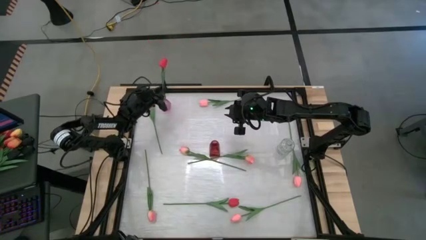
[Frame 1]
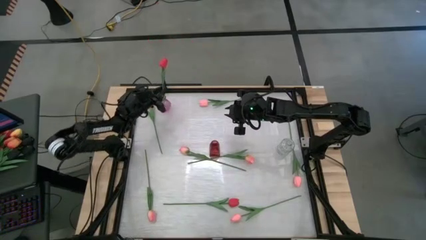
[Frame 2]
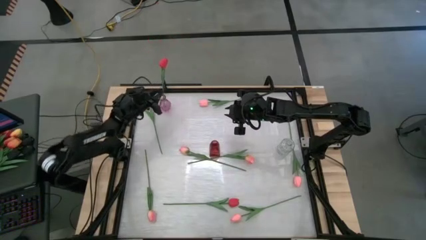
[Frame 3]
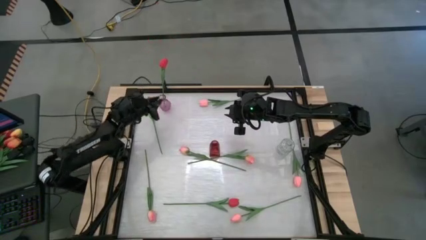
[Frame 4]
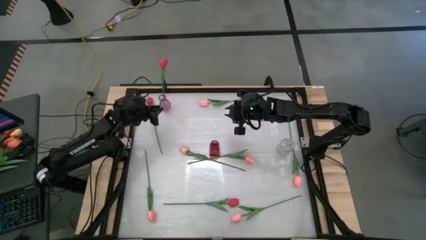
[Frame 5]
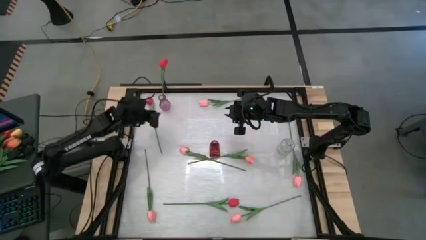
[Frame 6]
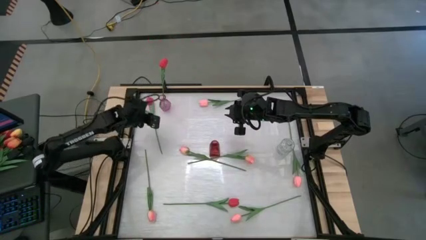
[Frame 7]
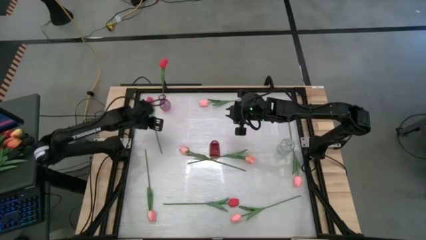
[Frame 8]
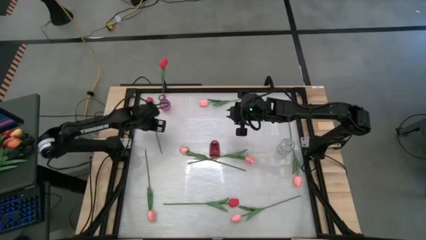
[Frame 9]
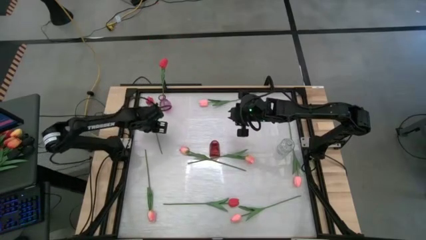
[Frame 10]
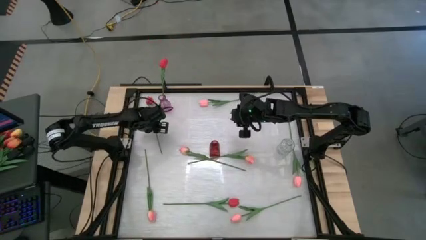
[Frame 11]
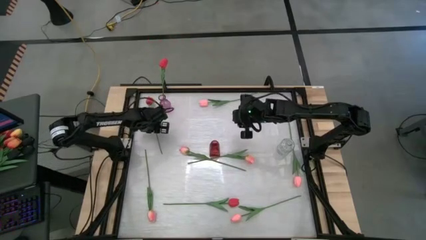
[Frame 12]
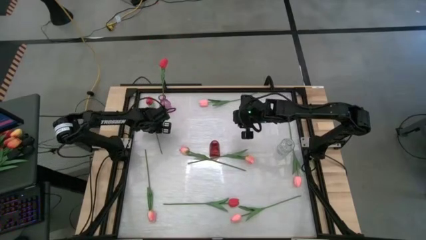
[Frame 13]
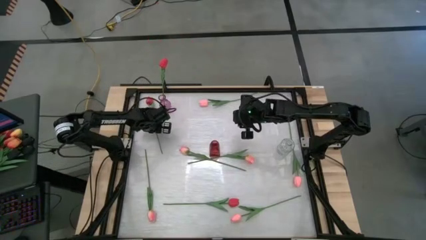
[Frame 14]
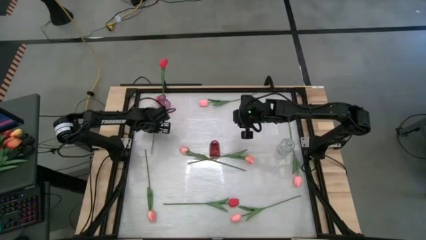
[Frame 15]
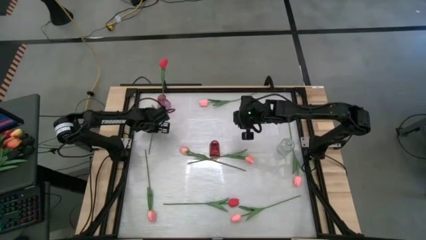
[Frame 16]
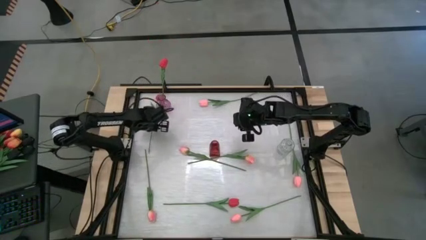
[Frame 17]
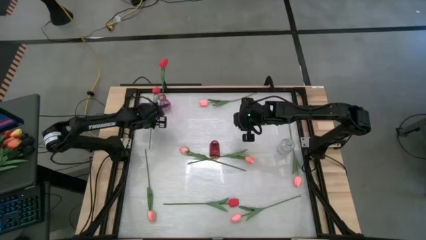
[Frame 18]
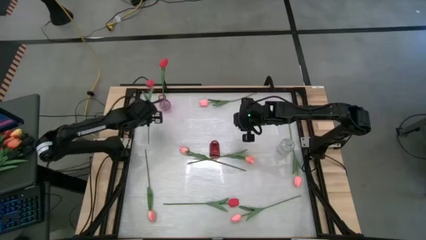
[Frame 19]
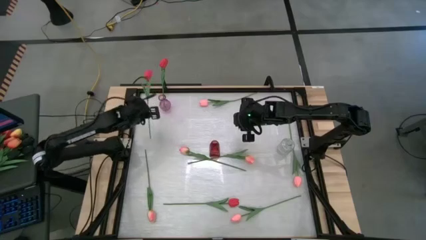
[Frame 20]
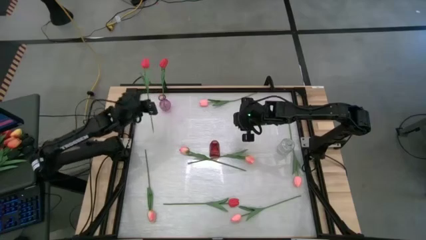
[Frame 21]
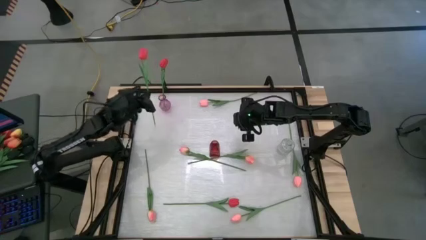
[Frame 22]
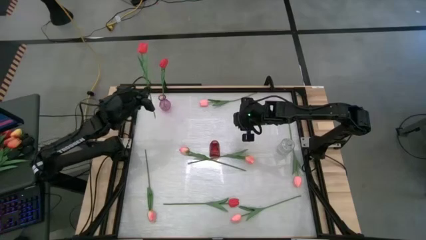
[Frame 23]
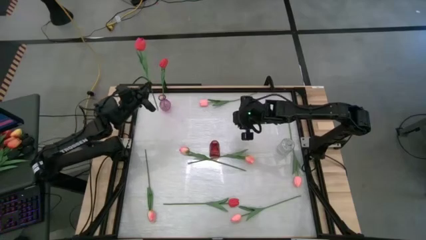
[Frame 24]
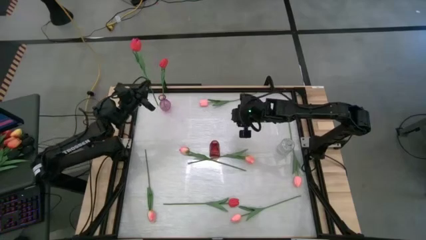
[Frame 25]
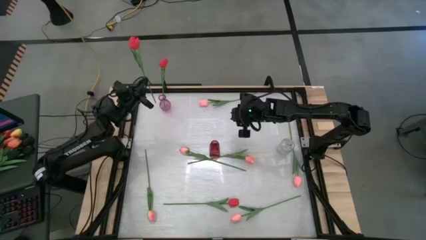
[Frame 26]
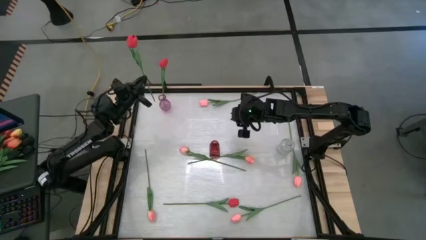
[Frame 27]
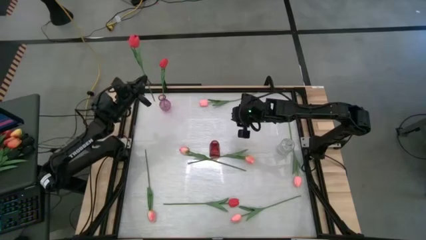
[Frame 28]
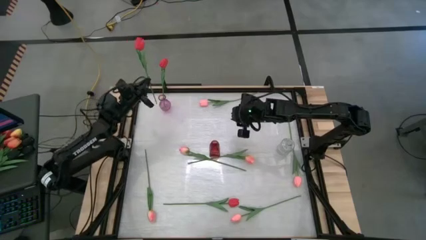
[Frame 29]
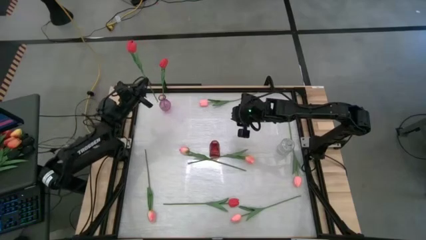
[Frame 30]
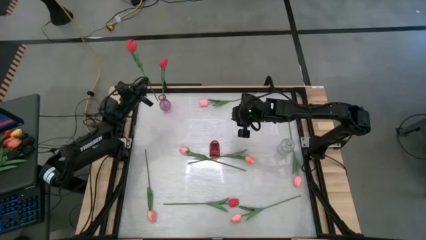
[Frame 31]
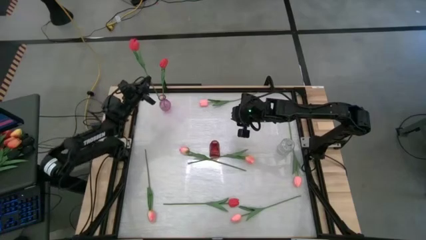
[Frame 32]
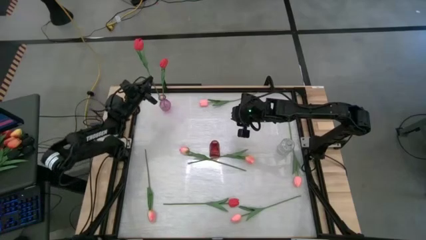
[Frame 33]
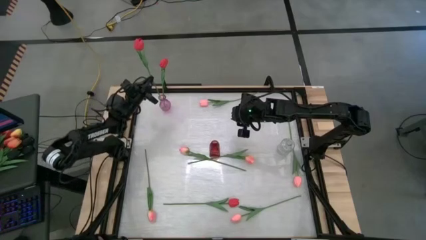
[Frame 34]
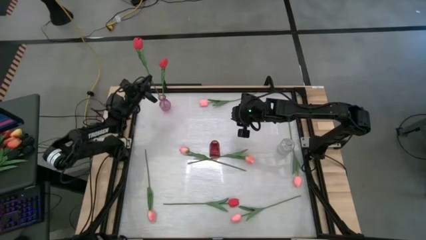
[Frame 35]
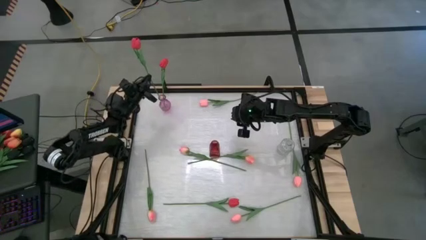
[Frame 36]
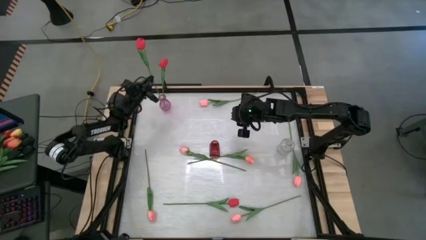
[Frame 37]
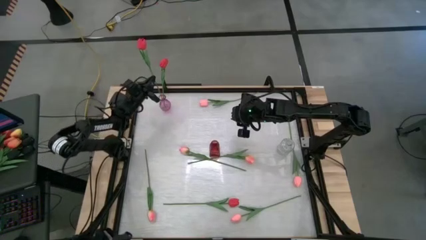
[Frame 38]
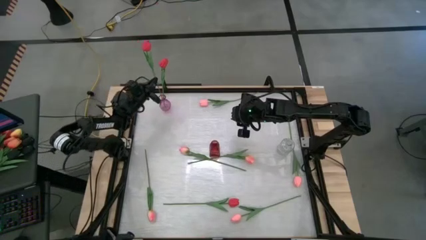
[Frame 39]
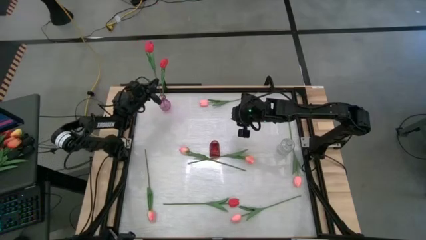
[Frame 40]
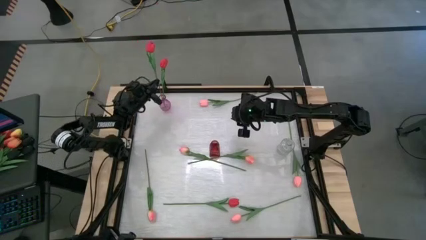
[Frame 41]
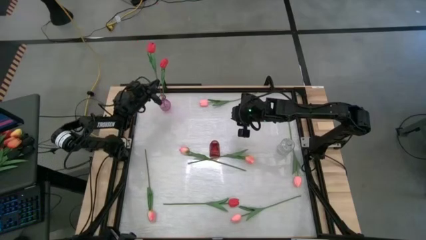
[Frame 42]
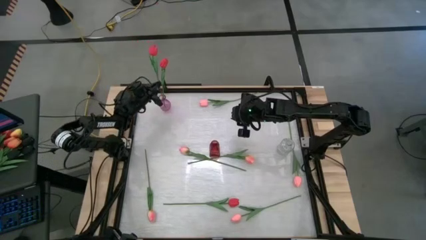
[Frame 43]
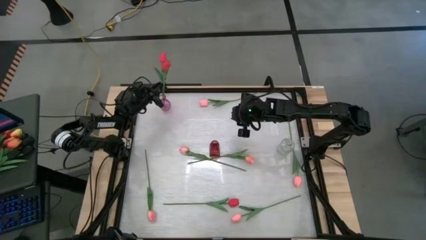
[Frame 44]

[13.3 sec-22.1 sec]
Task: Sort flowers into vase by color
Put the top red tulip into the violet vase

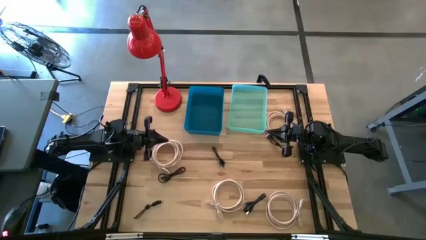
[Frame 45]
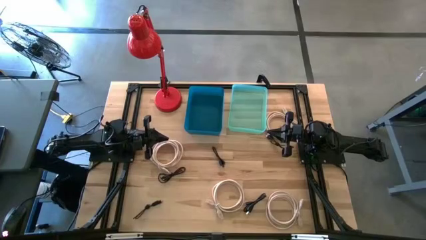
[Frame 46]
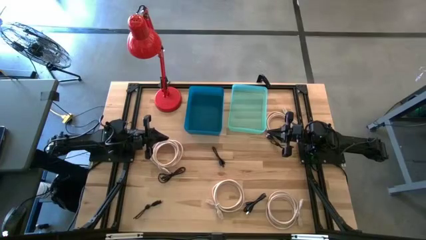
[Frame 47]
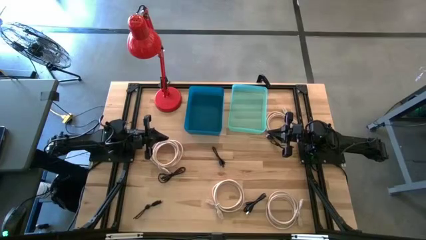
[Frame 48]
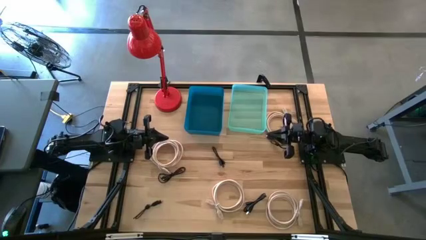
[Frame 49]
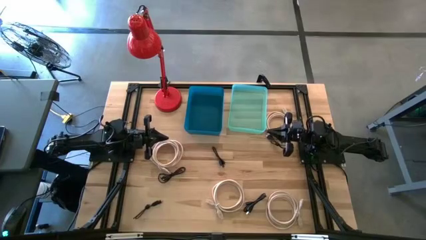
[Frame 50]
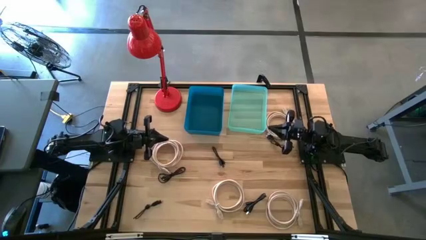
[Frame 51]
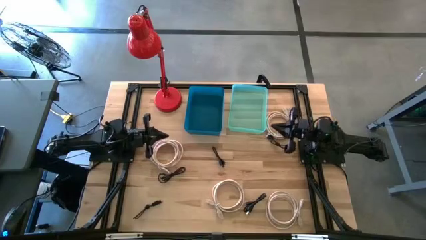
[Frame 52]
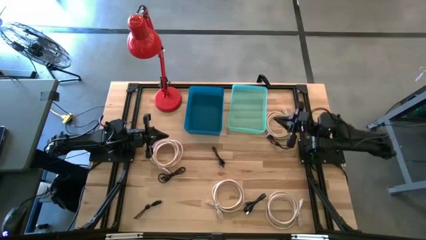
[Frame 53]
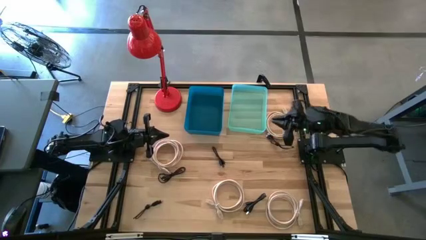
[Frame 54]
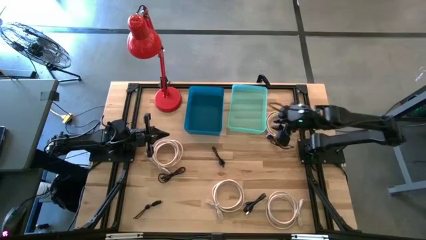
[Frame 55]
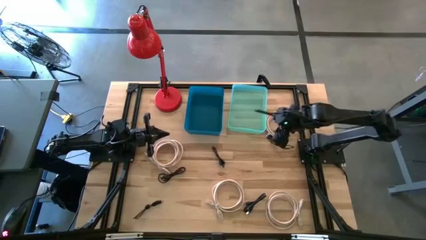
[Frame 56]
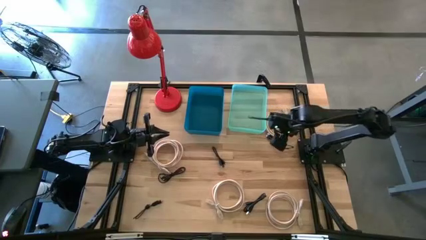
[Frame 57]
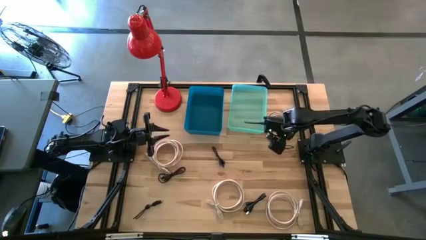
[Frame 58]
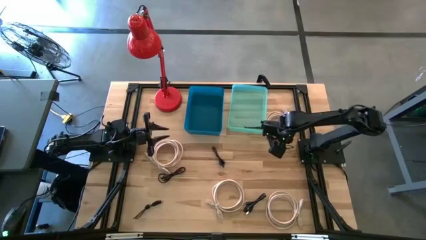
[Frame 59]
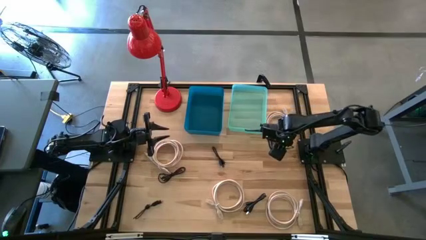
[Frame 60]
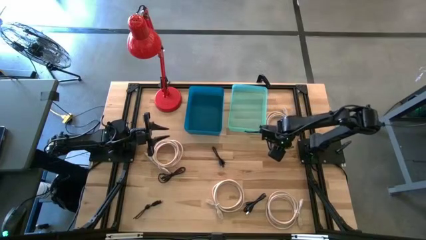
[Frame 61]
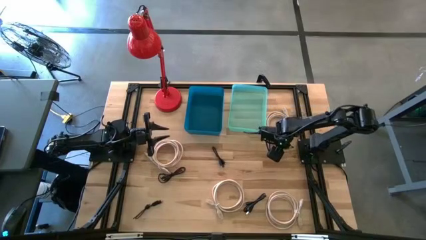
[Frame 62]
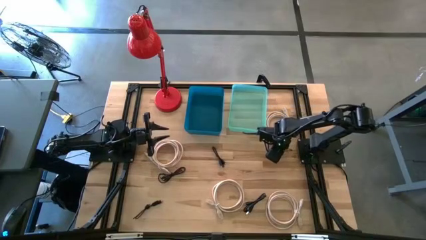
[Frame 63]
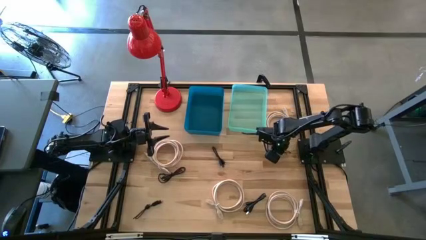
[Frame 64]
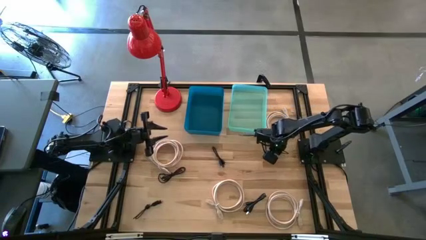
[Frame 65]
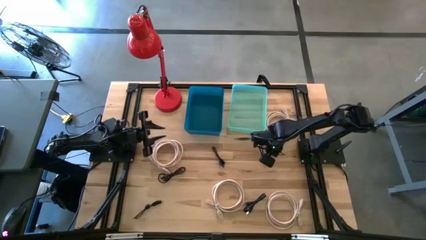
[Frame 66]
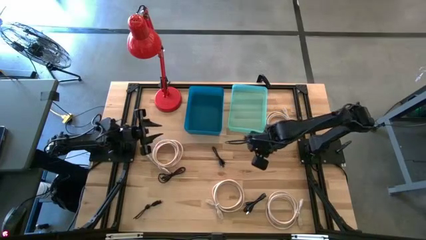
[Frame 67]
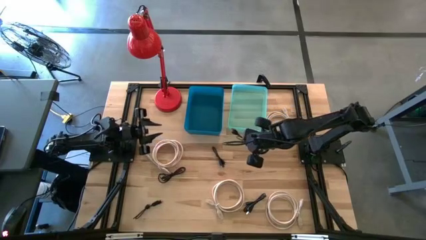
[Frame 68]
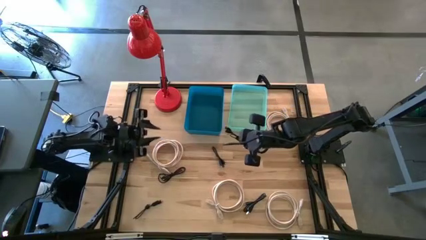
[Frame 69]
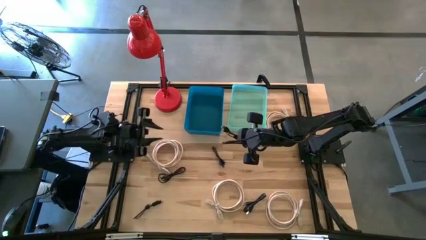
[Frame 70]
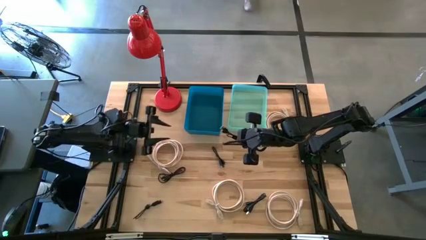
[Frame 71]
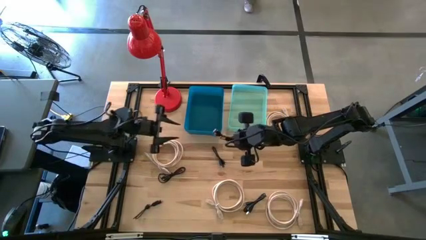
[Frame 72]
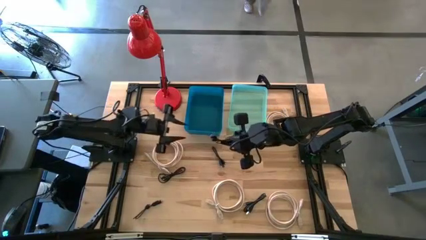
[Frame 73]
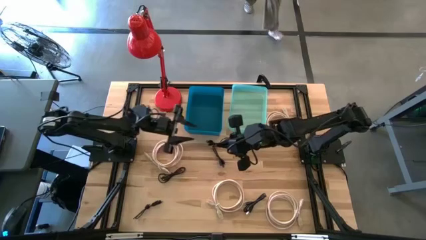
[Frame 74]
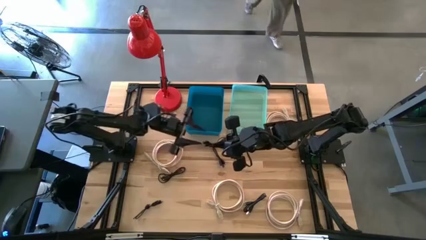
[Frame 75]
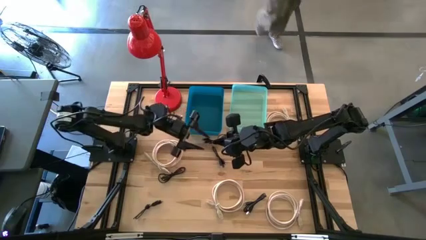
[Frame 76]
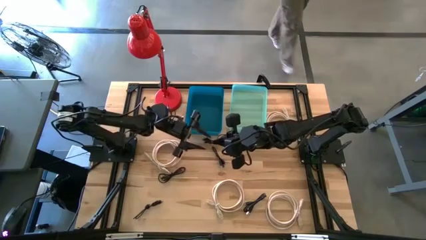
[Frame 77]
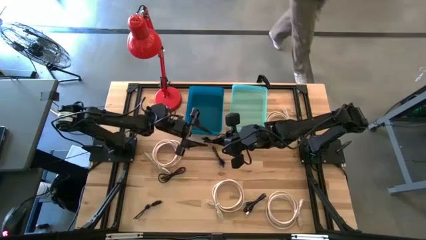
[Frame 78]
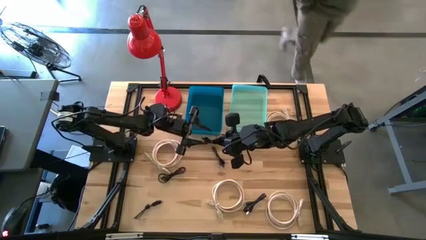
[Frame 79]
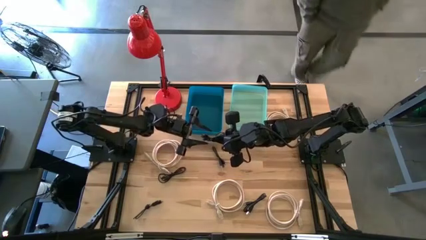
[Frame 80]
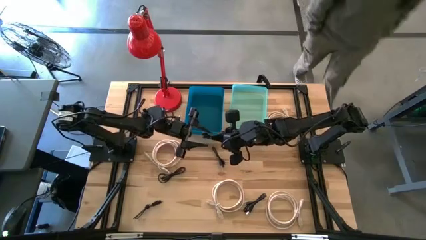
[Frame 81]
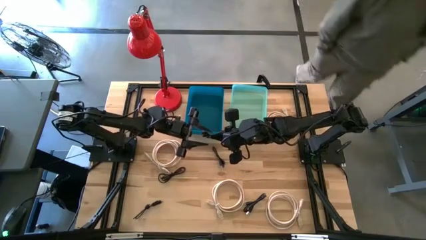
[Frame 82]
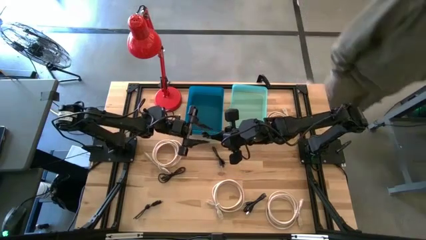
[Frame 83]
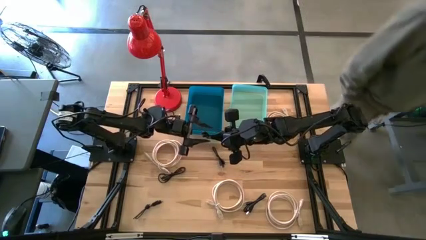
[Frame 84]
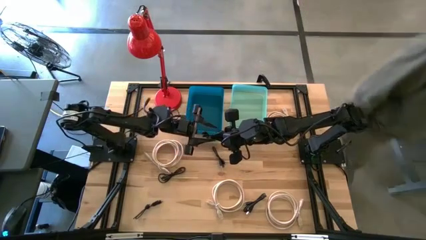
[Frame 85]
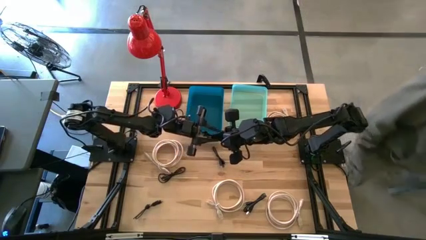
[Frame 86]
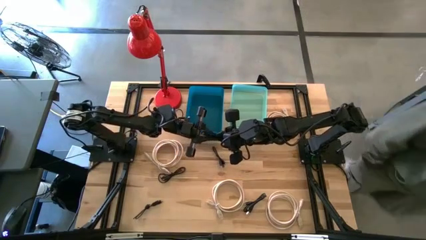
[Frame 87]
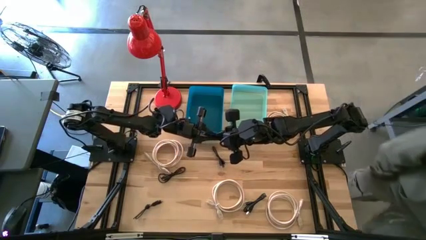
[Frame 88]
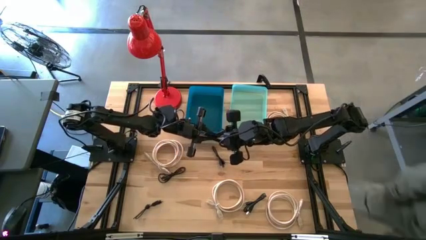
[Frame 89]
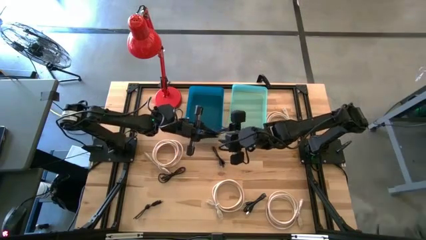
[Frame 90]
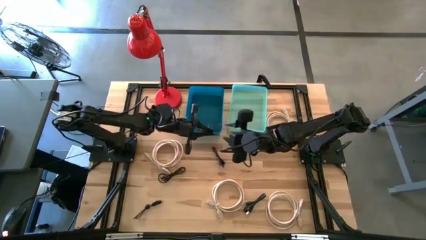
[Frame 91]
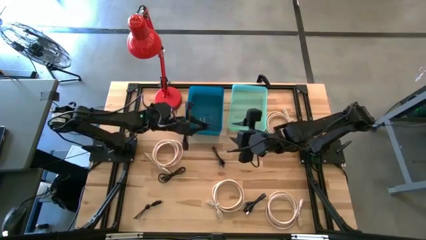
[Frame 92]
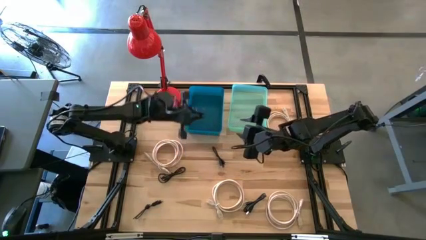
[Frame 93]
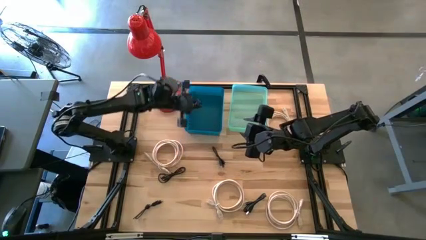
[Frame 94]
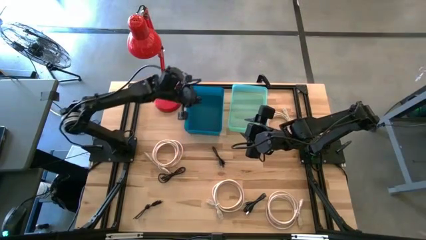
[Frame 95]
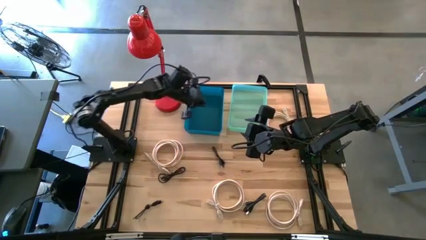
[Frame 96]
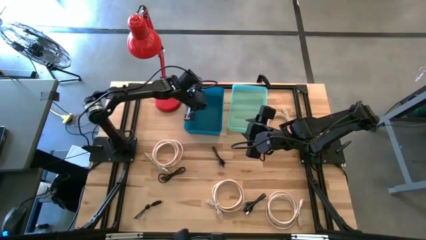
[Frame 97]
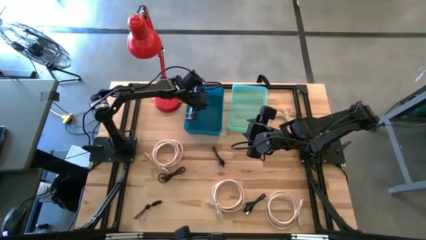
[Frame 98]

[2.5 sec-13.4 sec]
Task: Pick & Place USB Port
Put the black charger cable into the blue bin
